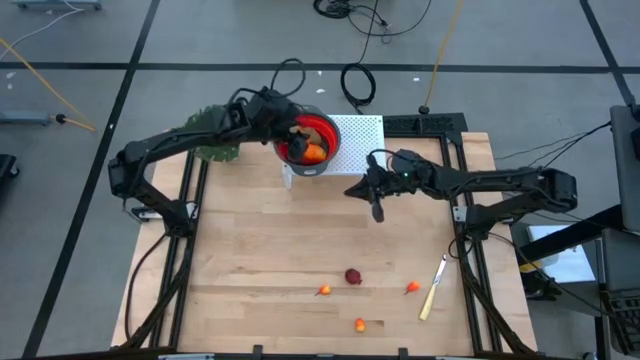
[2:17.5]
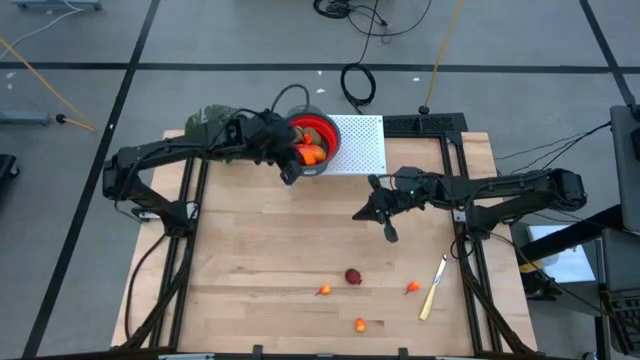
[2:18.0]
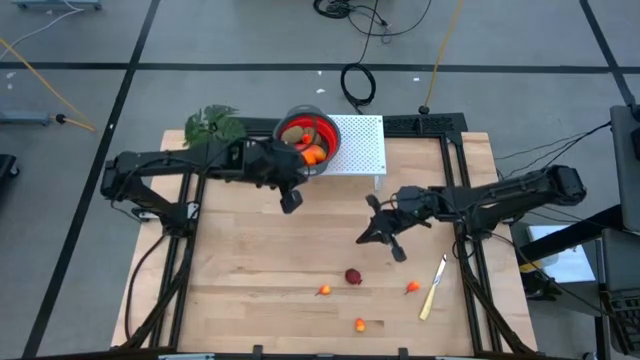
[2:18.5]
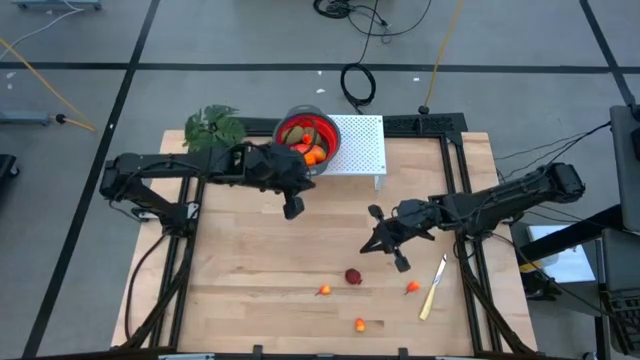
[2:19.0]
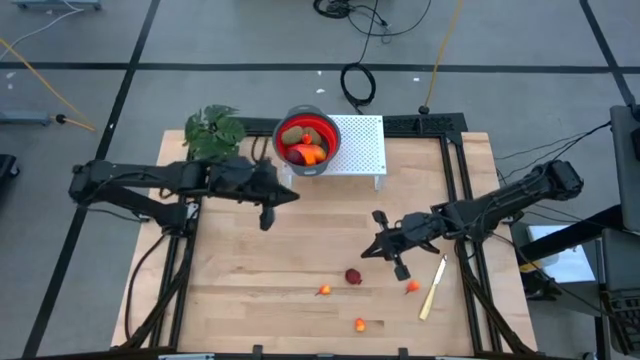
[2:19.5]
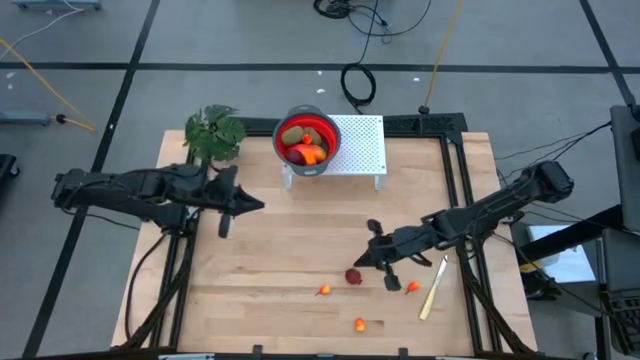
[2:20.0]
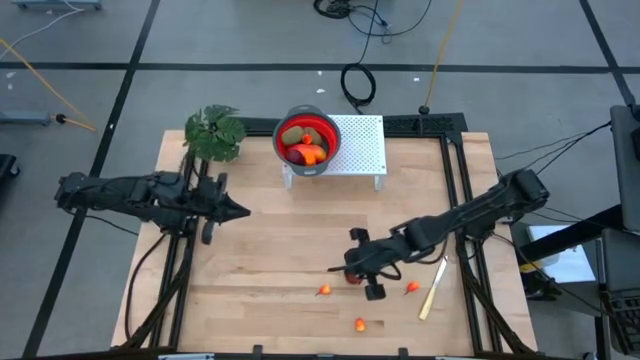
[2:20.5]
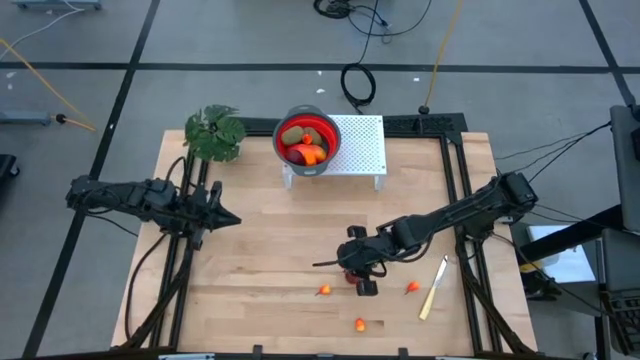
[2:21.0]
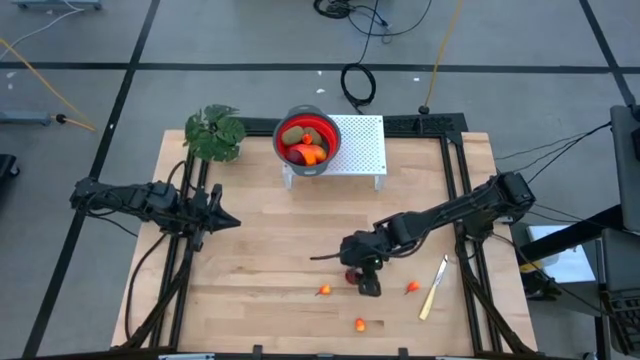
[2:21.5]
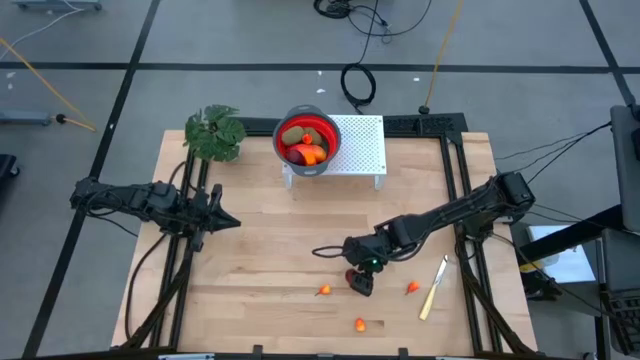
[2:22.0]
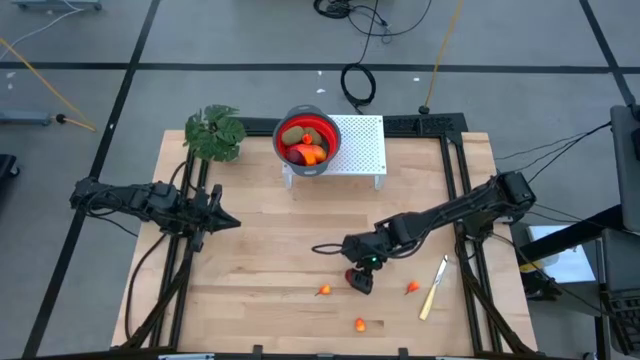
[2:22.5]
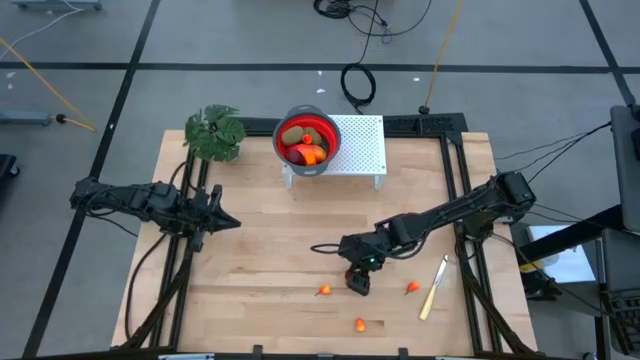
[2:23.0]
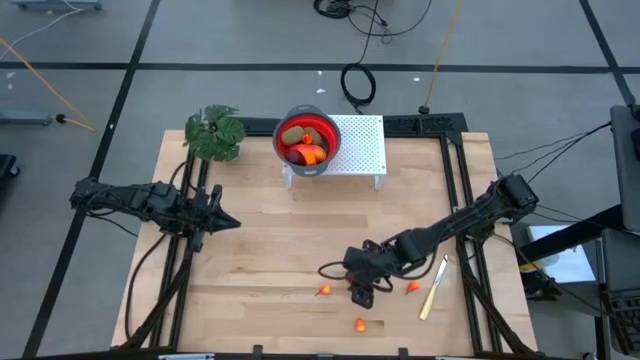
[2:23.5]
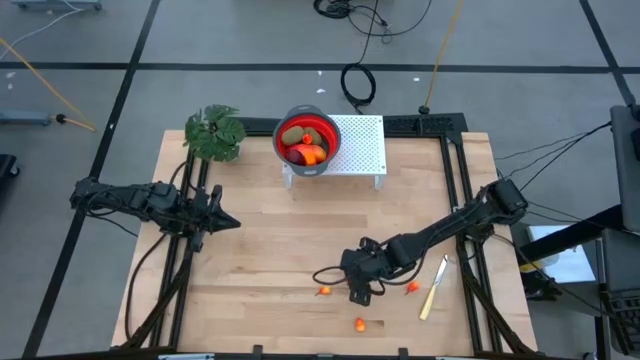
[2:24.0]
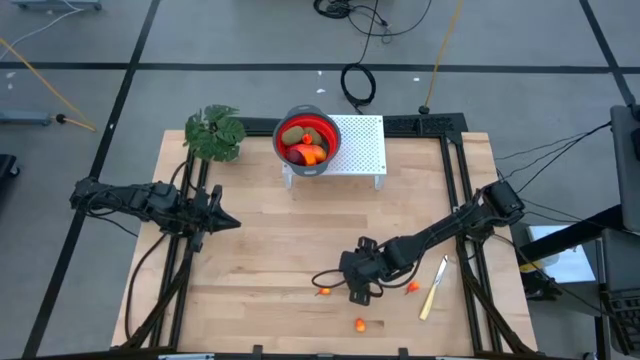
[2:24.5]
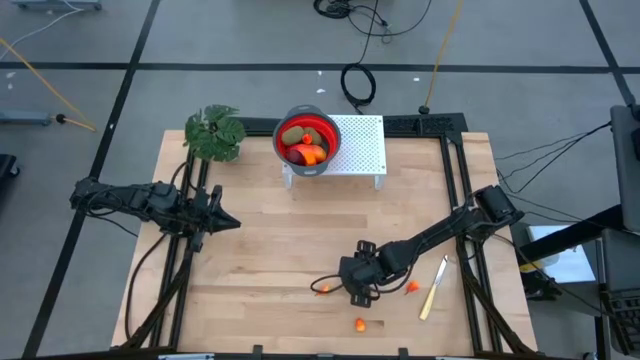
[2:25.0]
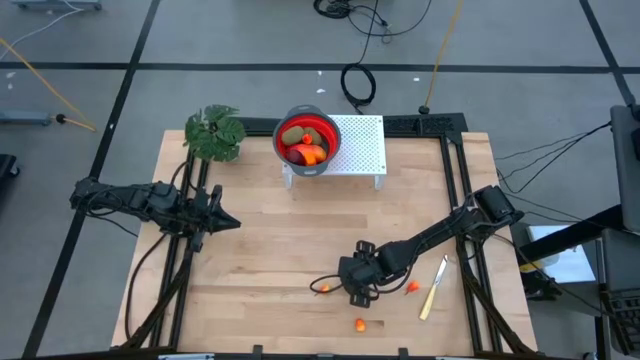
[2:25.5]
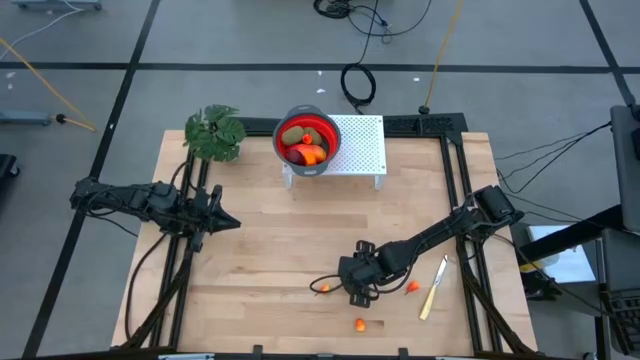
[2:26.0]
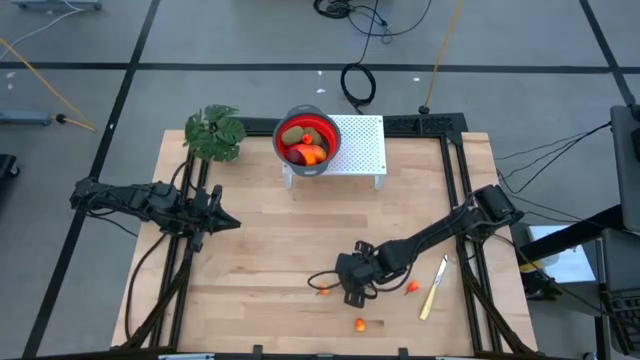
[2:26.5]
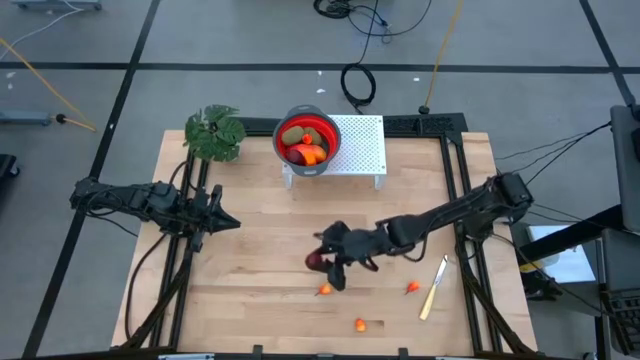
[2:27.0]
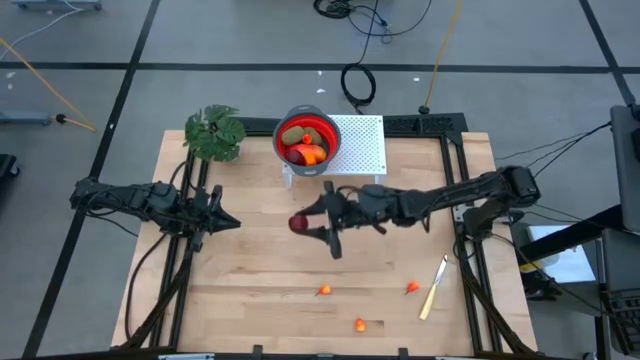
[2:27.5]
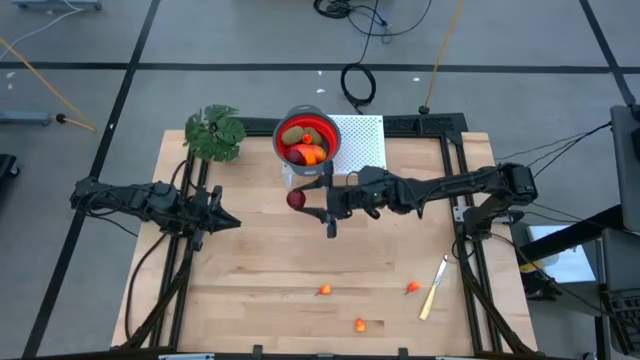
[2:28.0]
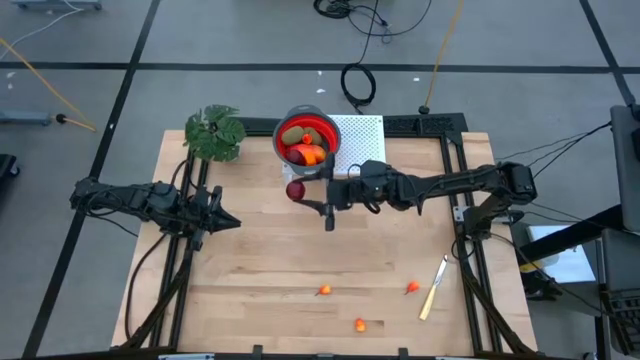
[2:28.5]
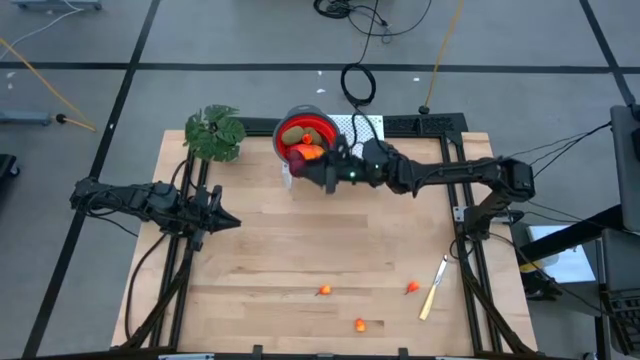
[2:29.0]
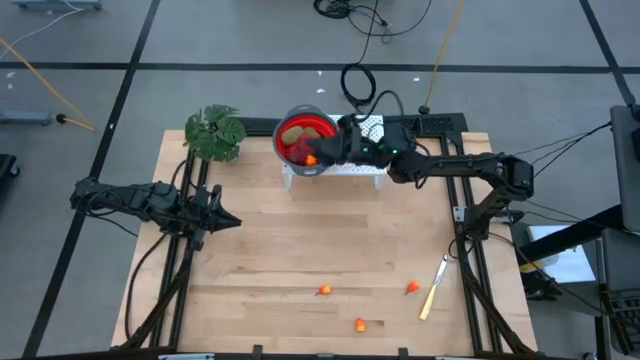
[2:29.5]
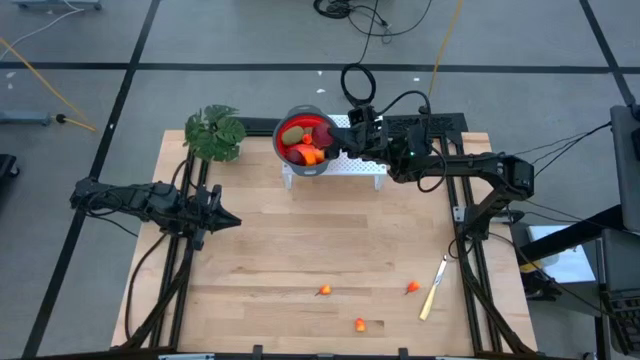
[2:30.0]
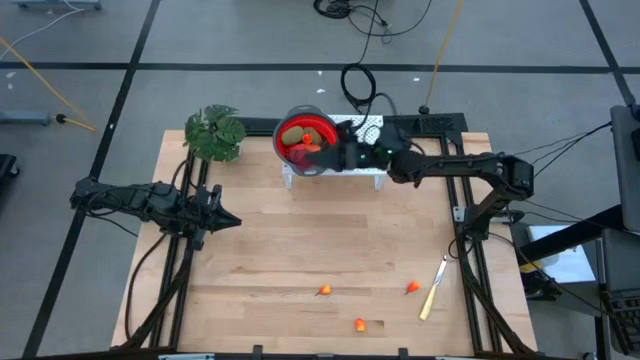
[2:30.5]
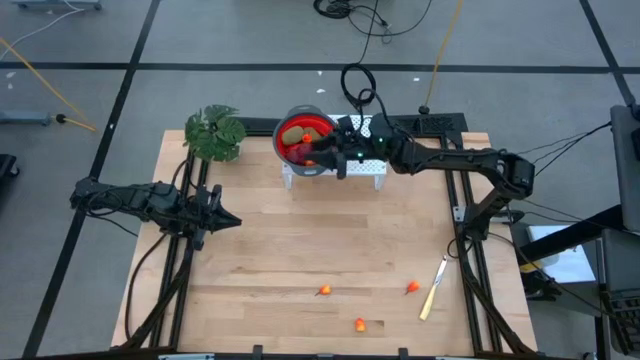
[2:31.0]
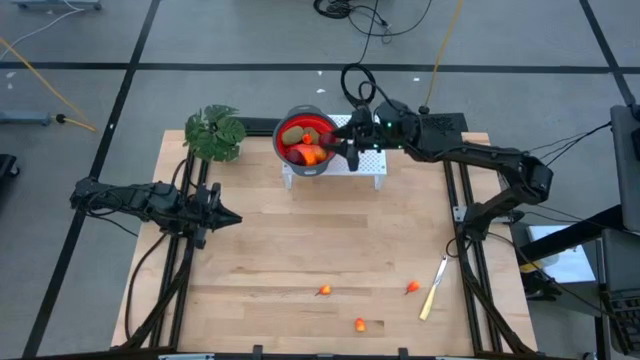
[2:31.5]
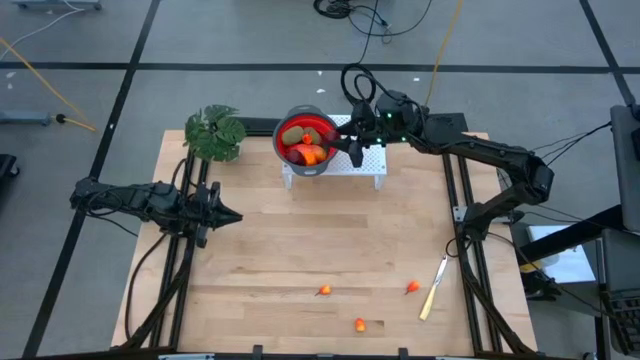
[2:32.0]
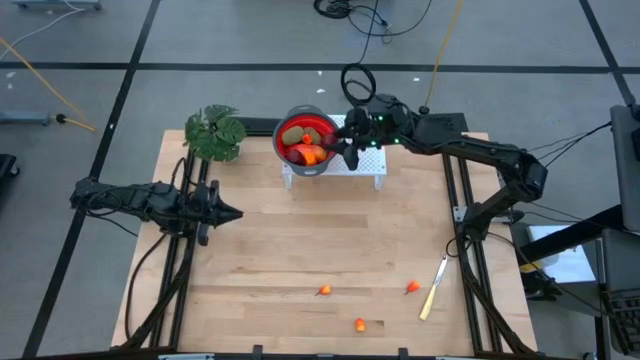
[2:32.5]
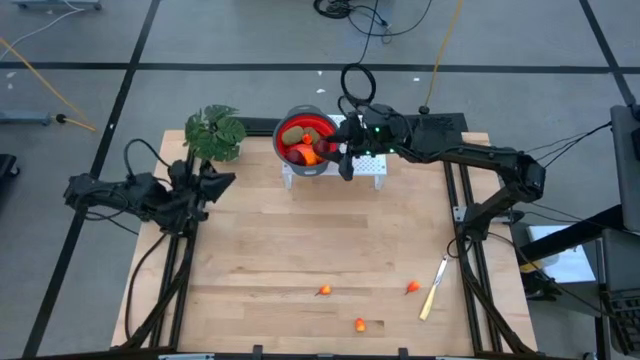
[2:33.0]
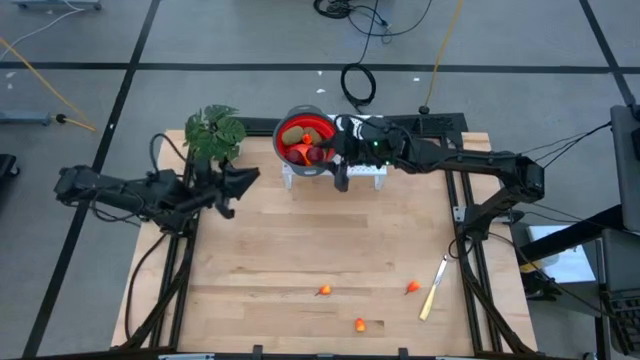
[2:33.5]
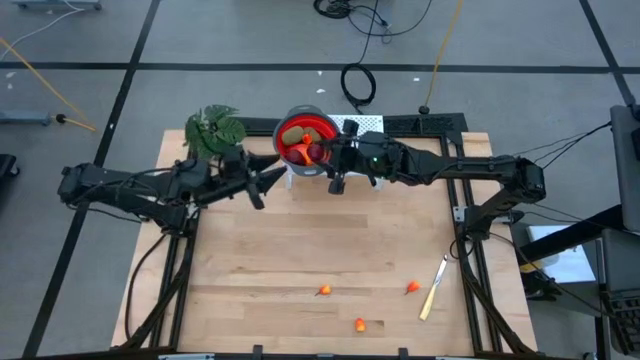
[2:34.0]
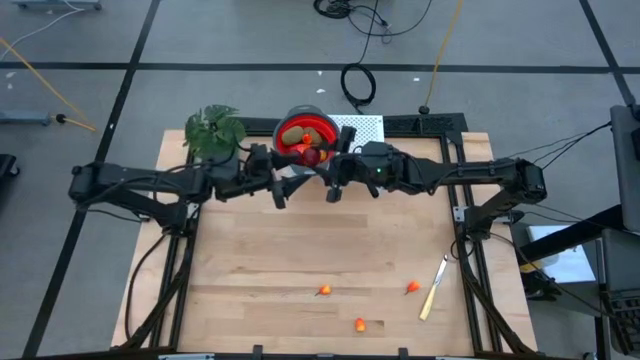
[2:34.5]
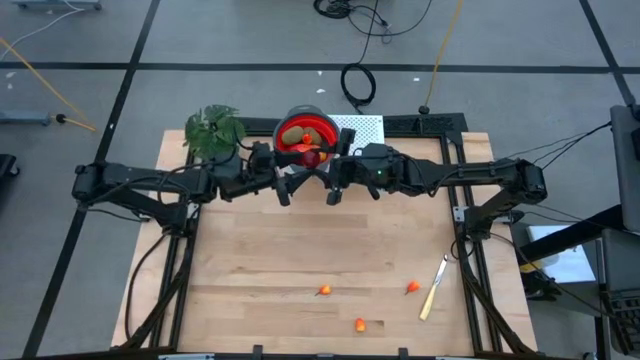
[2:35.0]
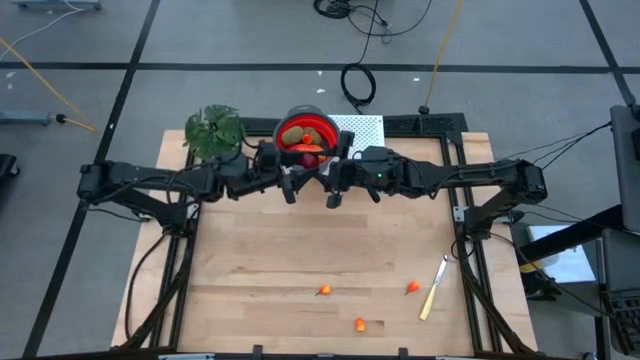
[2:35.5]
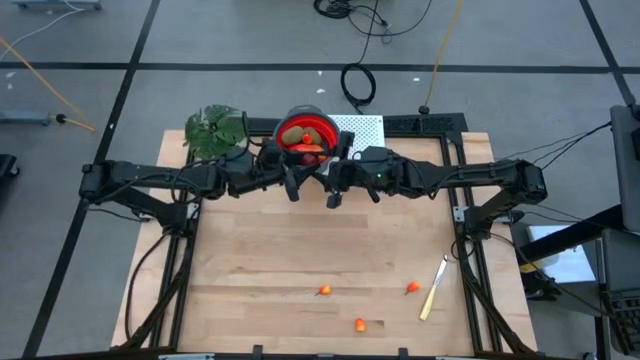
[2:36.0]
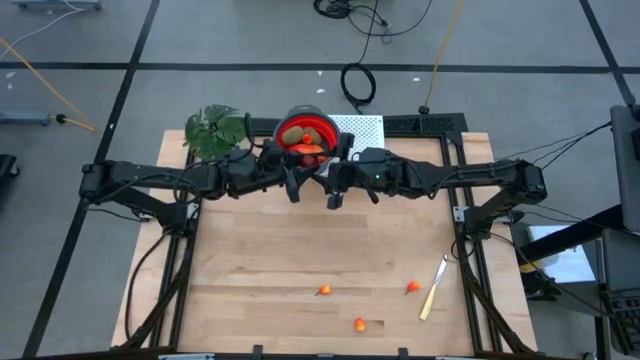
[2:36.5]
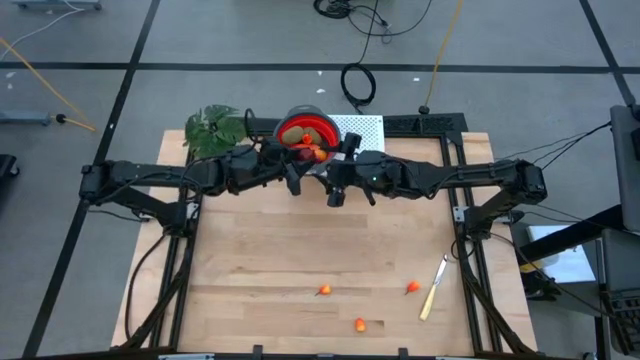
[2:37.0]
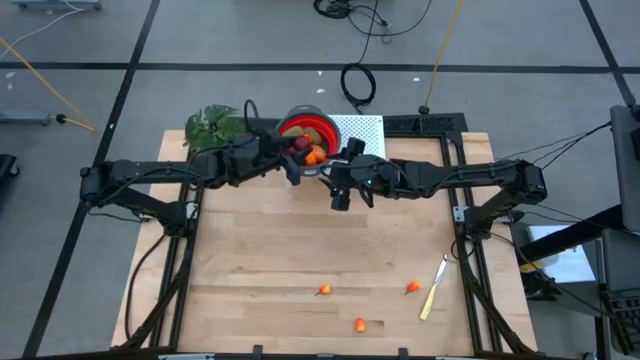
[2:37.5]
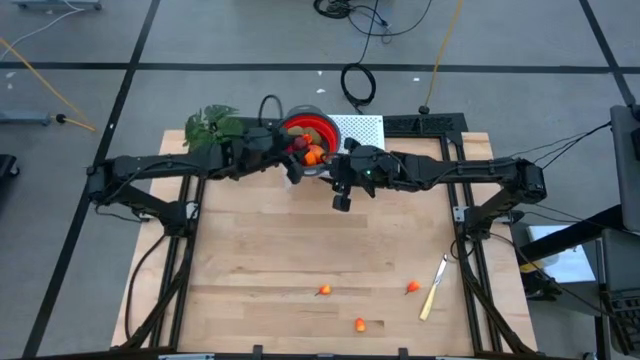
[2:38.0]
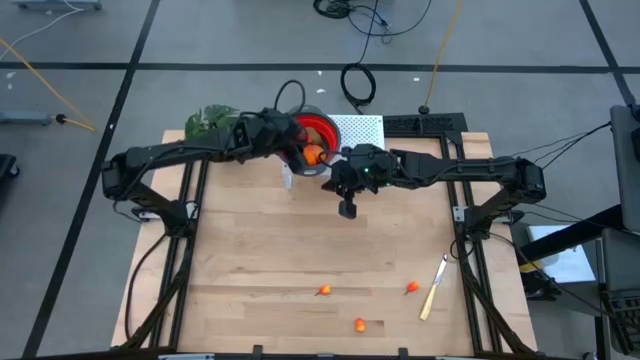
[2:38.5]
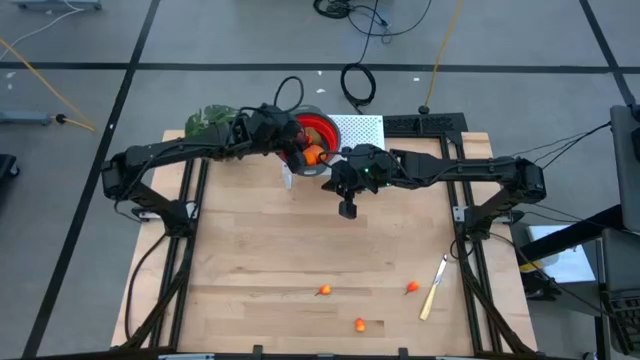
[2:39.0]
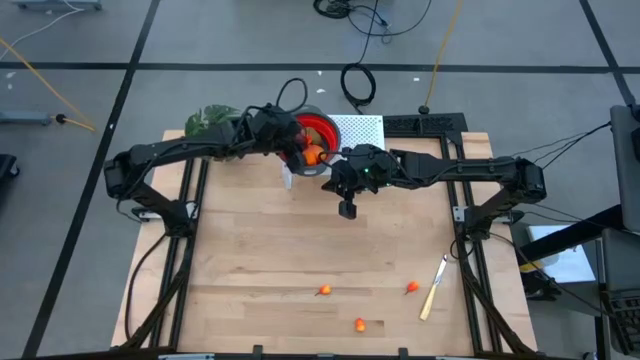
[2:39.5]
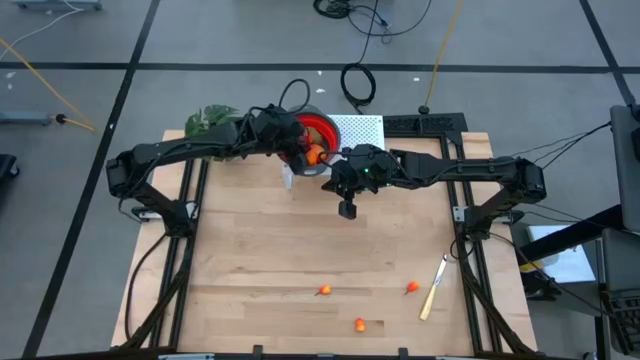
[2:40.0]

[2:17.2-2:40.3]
Task: Pick & Place Fruit
Put the pomegranate into the red strainer bowl
